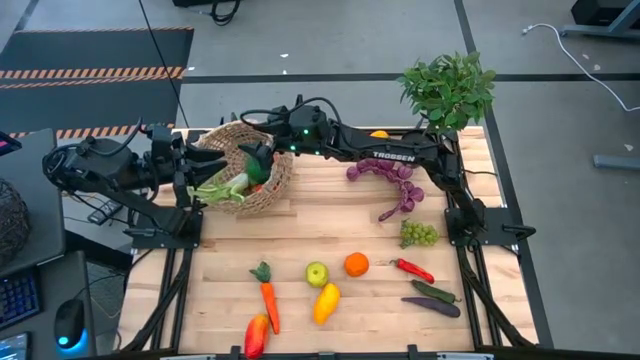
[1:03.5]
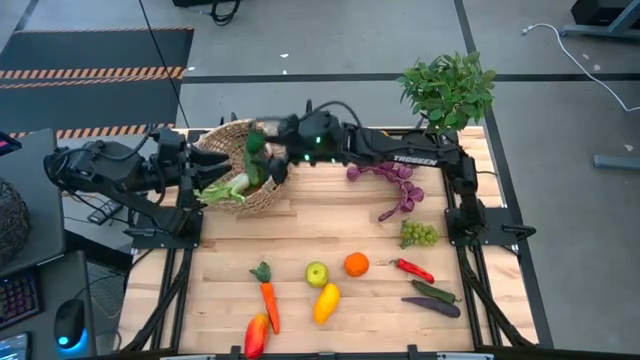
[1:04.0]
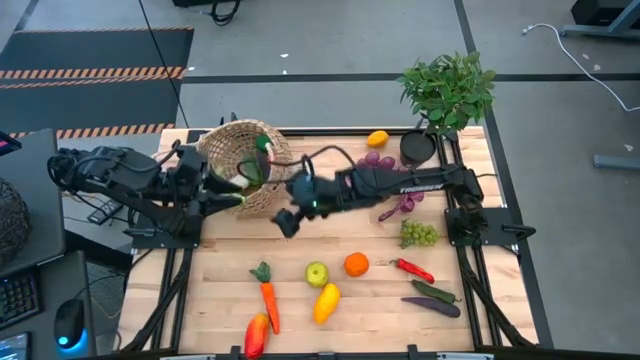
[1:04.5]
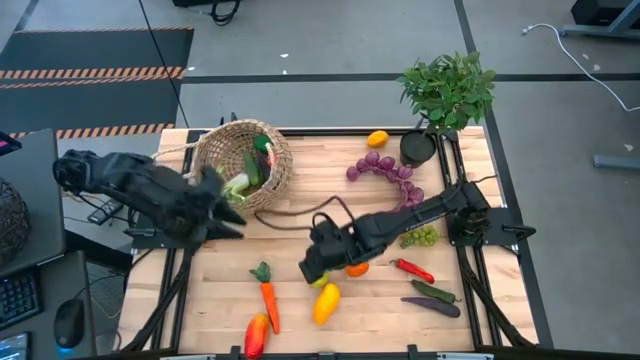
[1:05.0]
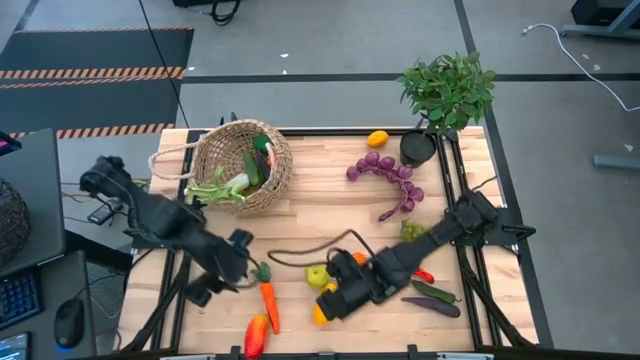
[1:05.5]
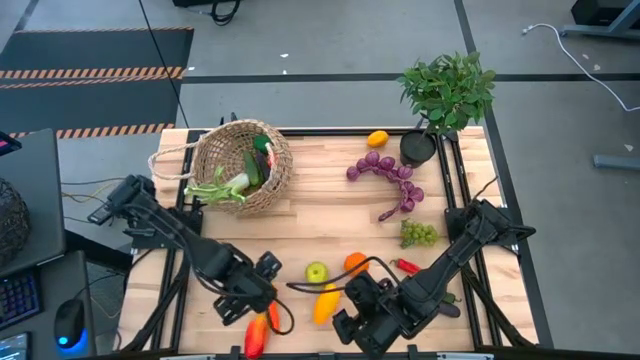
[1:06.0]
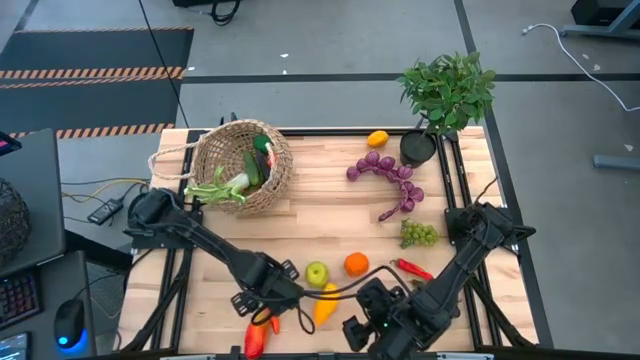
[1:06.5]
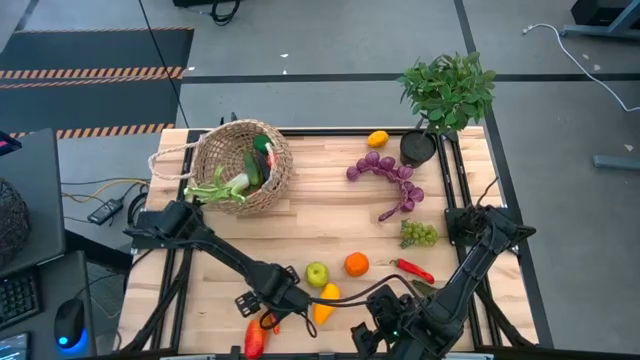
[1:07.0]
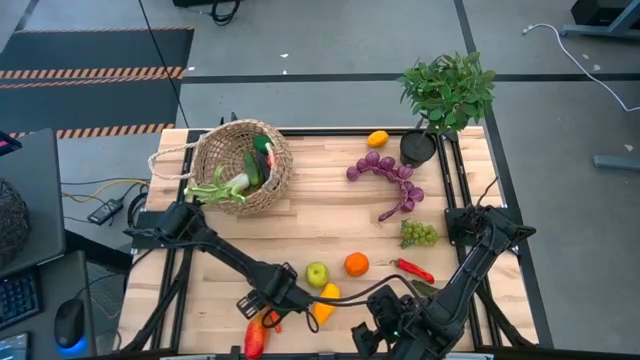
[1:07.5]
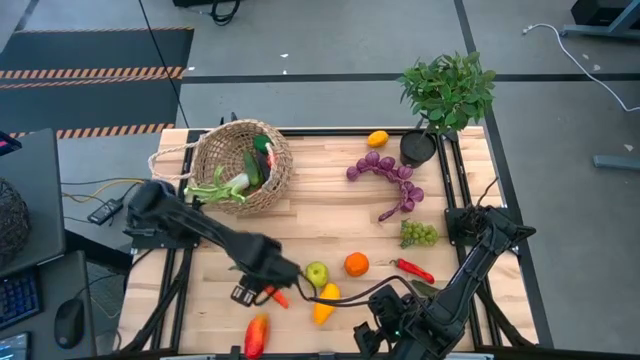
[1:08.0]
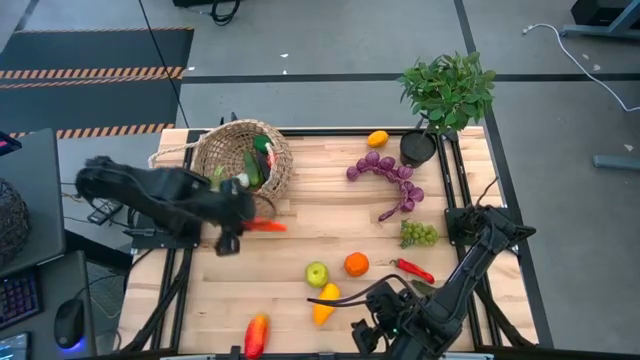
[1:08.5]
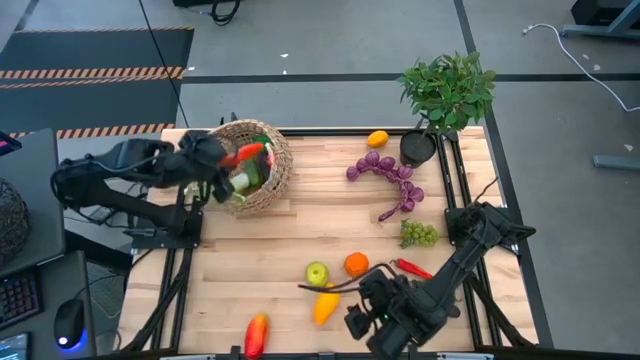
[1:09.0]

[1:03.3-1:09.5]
Task: Build produce basket
Put the orange carrot into the brown basket

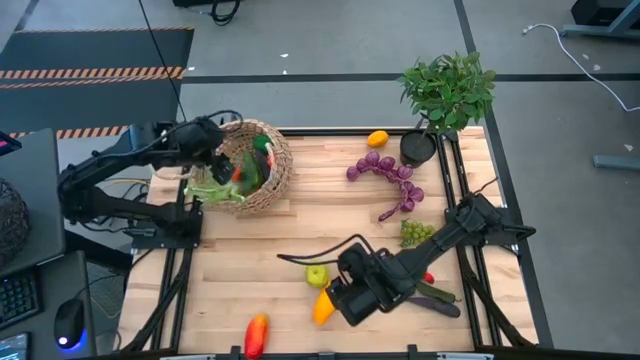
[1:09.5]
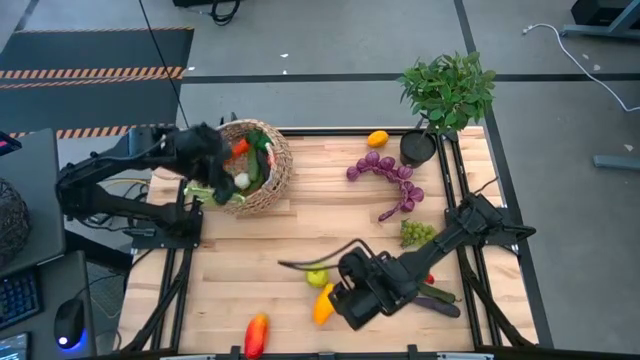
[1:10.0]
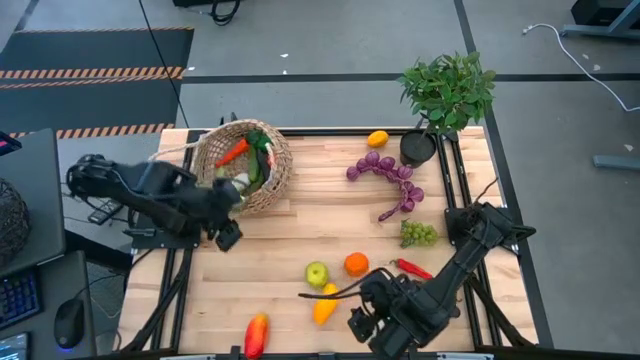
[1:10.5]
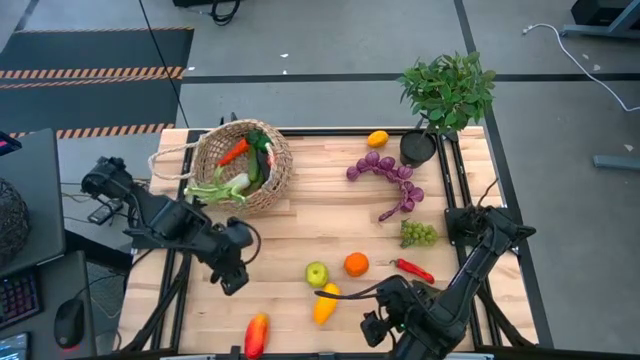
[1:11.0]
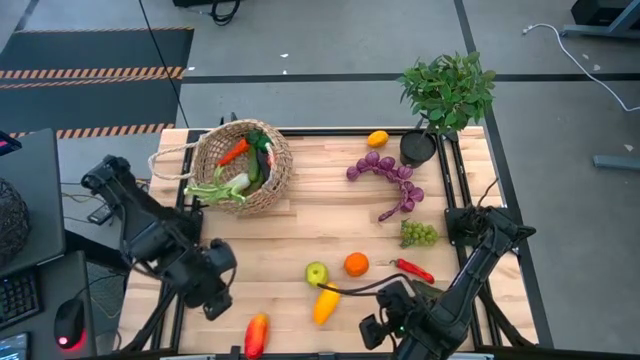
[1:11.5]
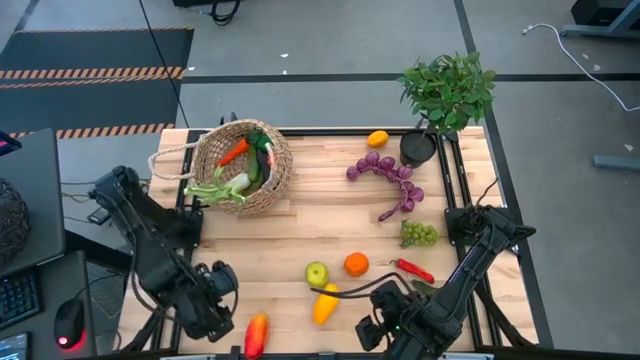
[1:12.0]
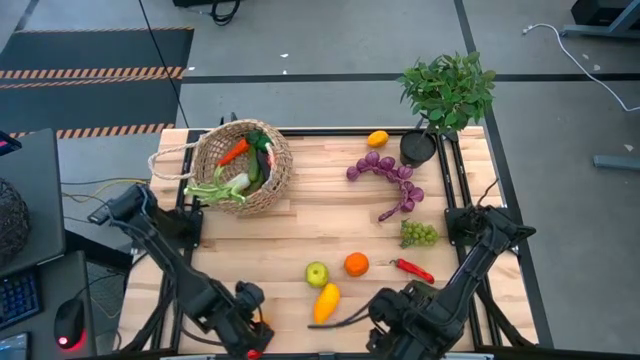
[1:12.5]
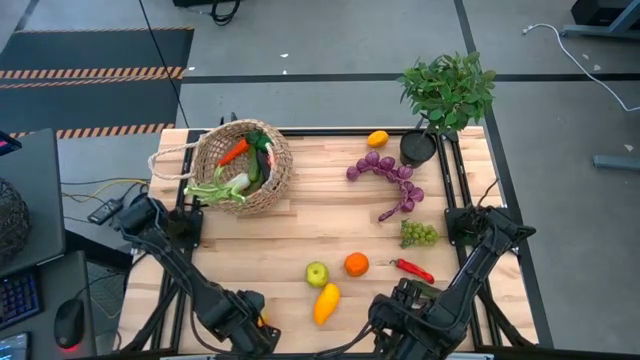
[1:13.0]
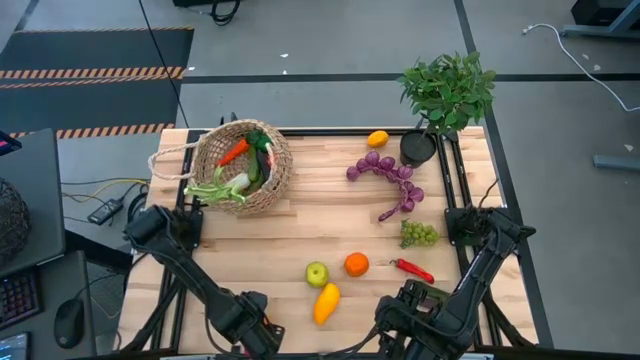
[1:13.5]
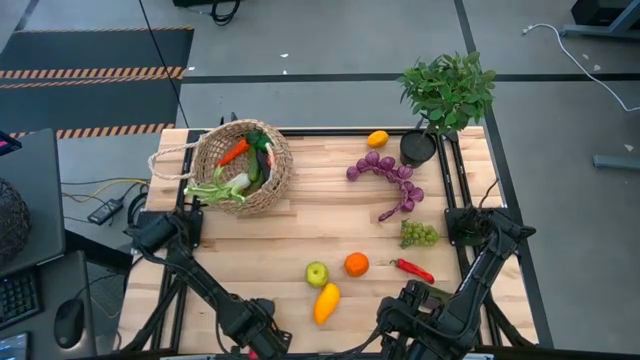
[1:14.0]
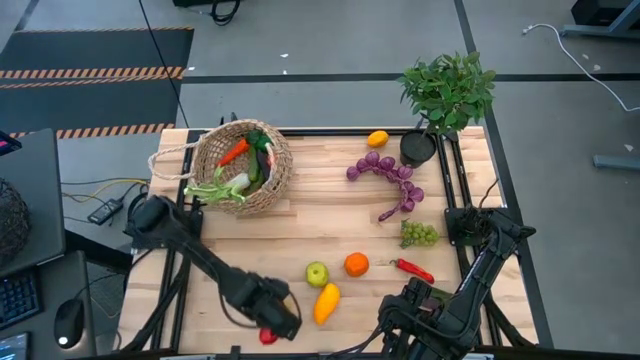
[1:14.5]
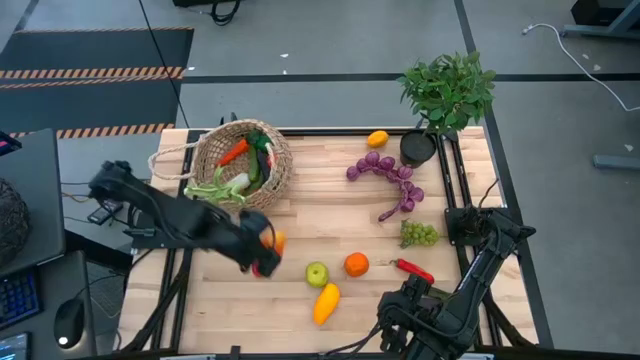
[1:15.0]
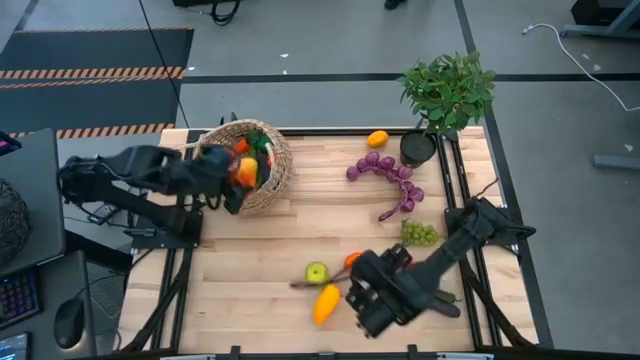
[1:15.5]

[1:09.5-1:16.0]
Put the orange mango into the brown basket

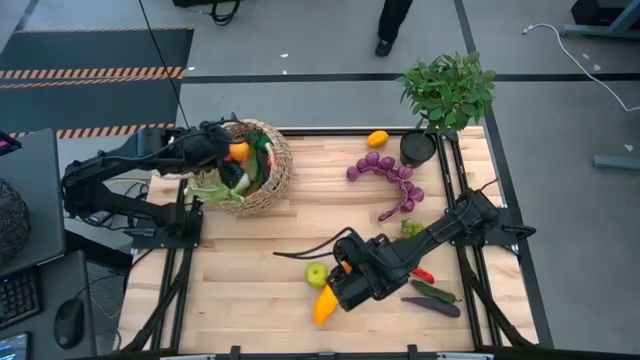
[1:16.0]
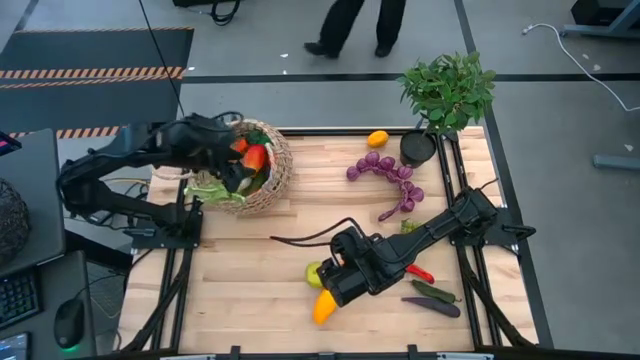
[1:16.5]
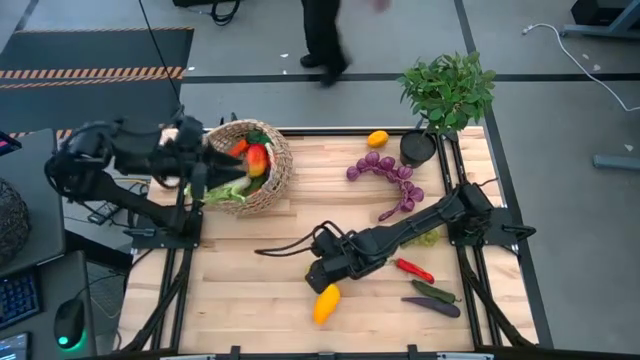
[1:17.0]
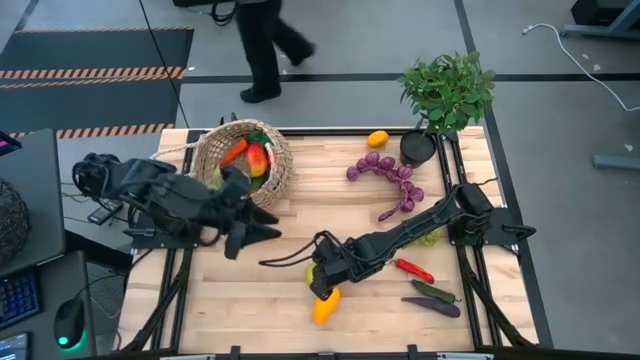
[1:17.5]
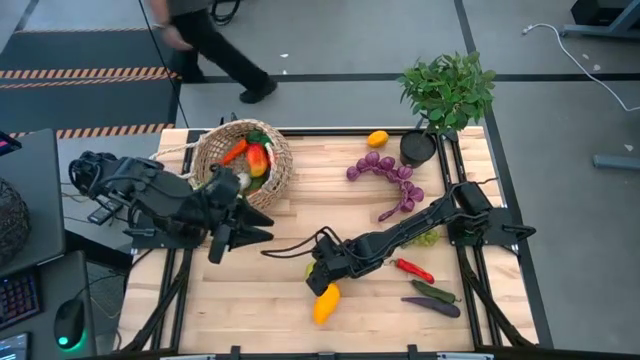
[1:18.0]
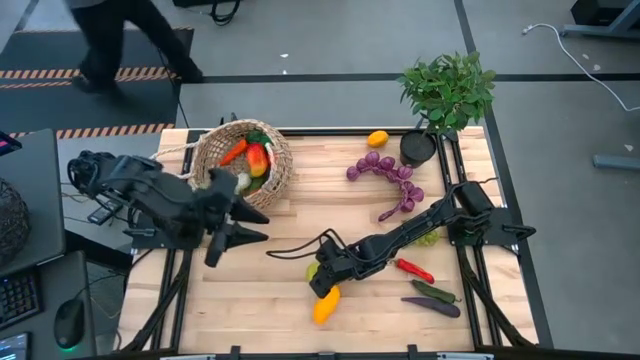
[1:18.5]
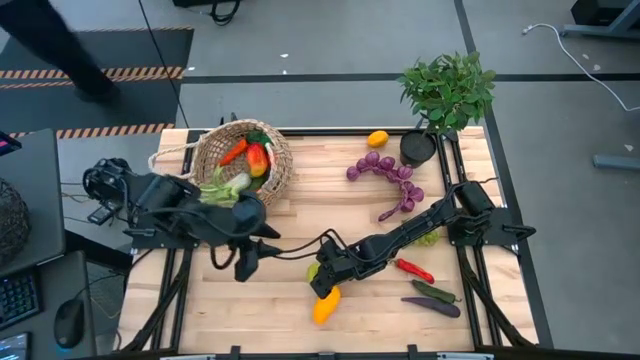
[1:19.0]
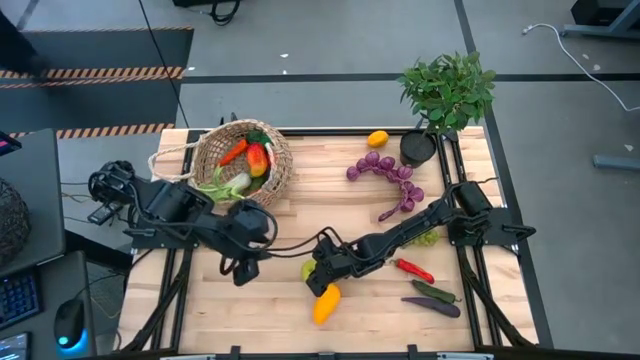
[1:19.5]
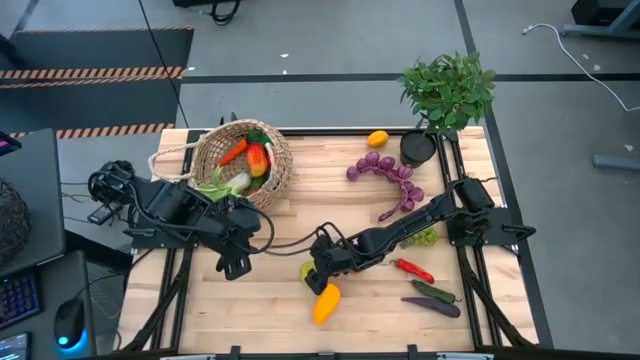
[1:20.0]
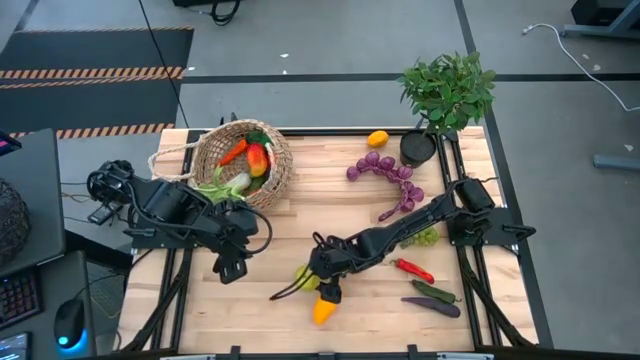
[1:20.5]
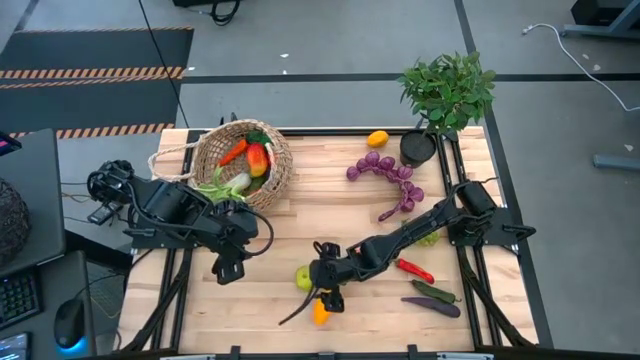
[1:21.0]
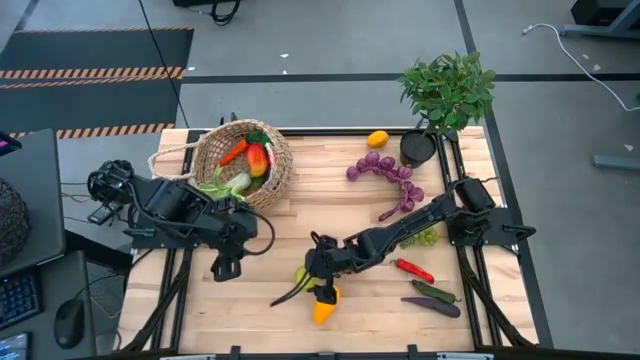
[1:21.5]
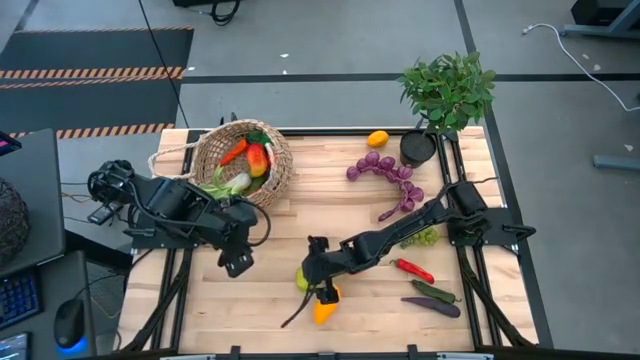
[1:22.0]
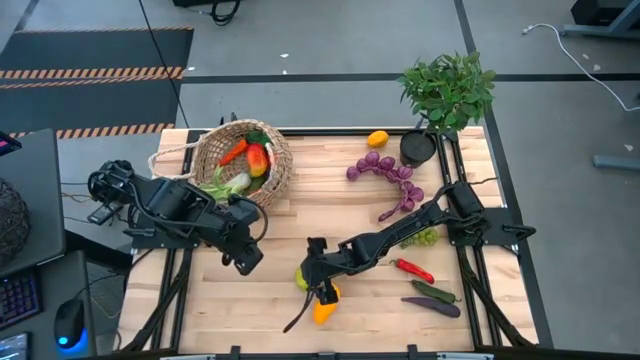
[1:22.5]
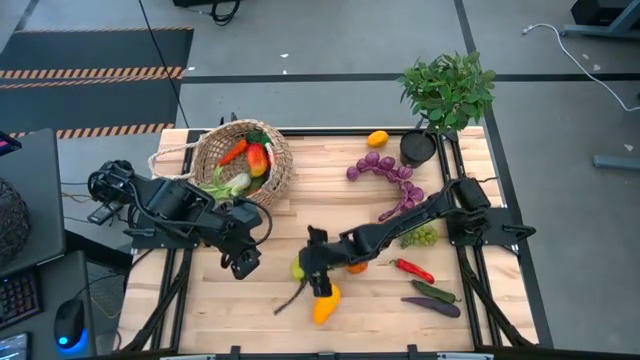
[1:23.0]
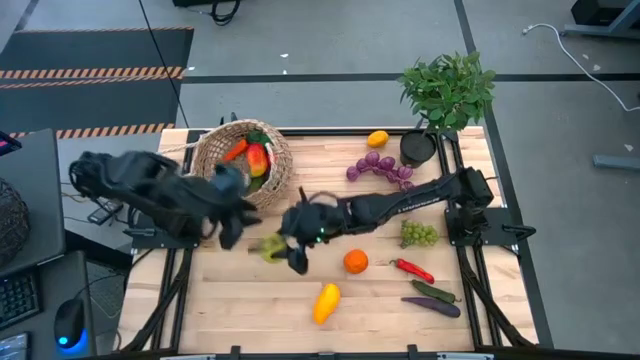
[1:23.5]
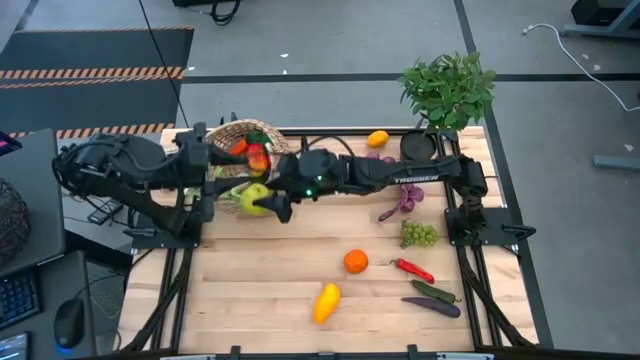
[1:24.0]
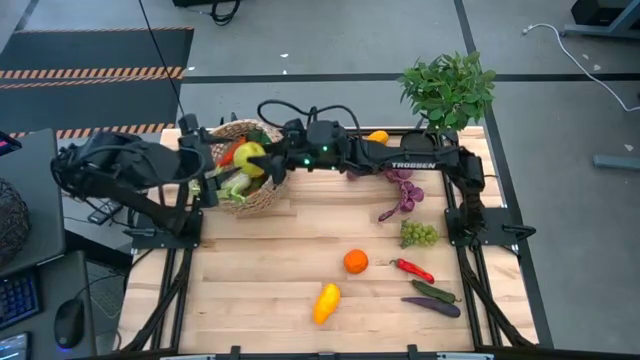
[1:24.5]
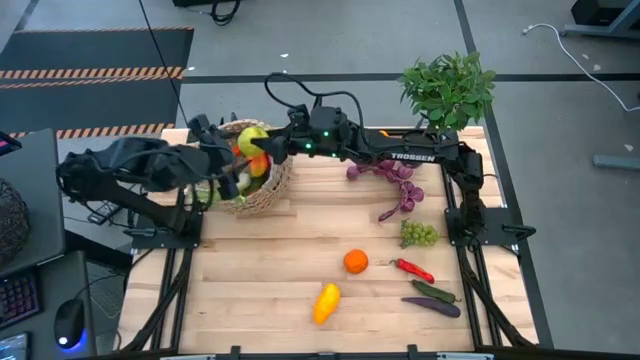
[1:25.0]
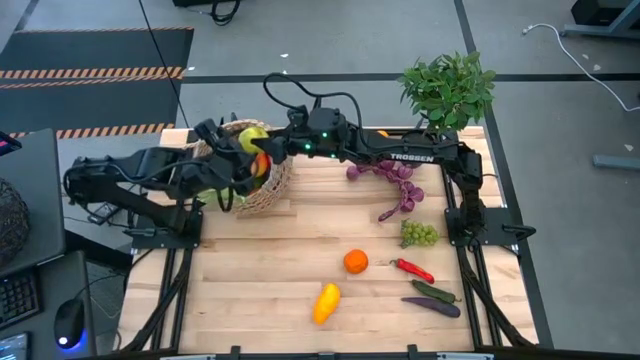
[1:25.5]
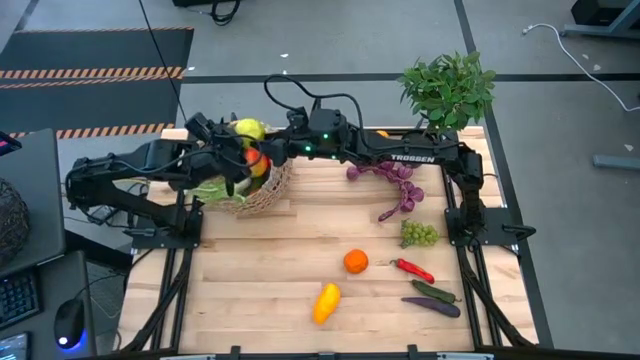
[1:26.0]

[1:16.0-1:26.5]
Put the green apple into the brown basket
